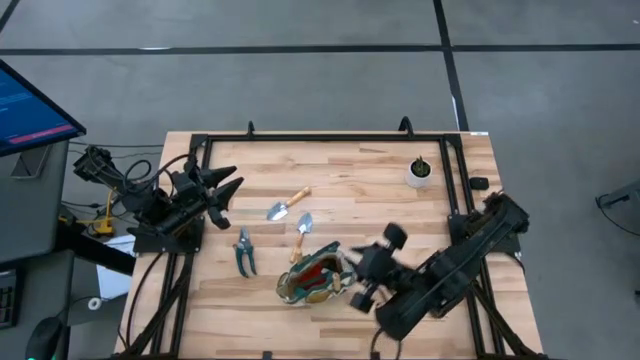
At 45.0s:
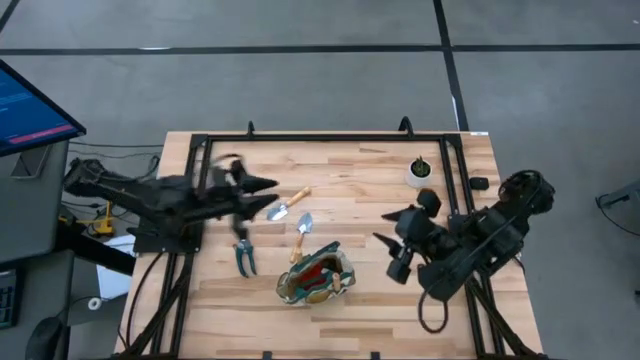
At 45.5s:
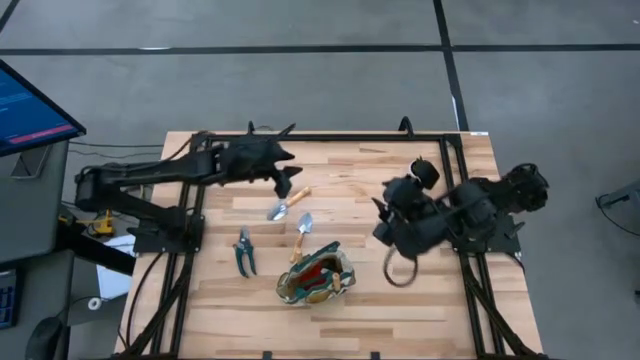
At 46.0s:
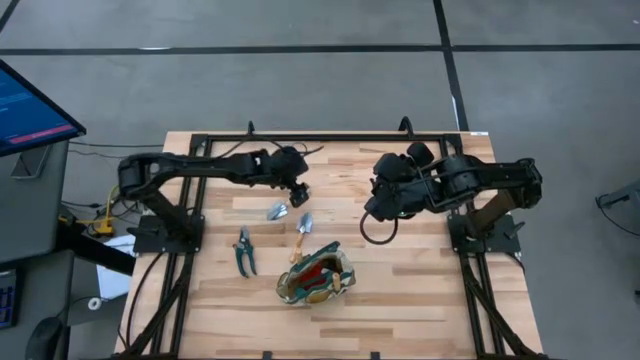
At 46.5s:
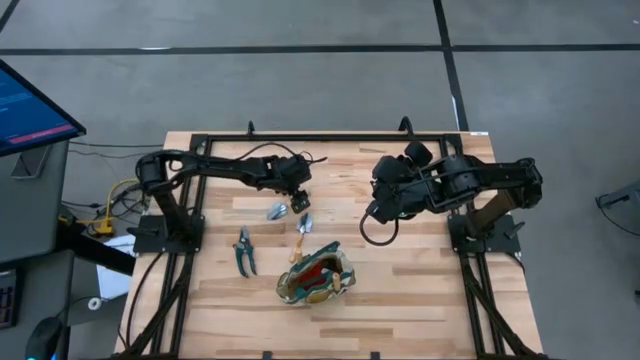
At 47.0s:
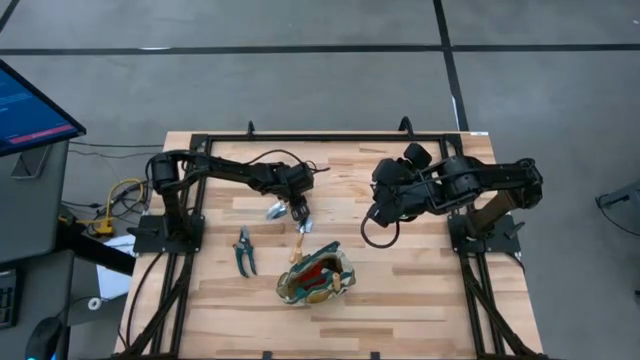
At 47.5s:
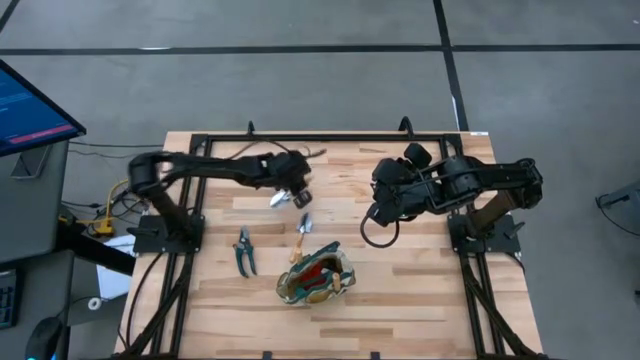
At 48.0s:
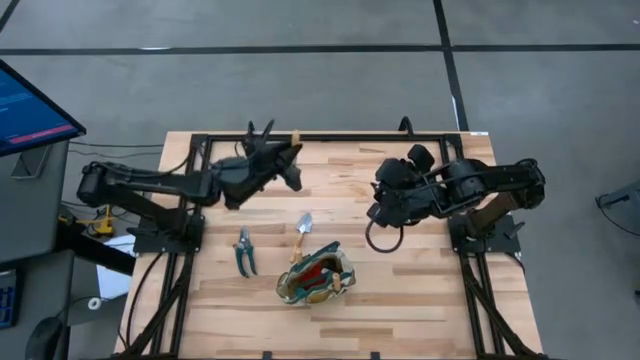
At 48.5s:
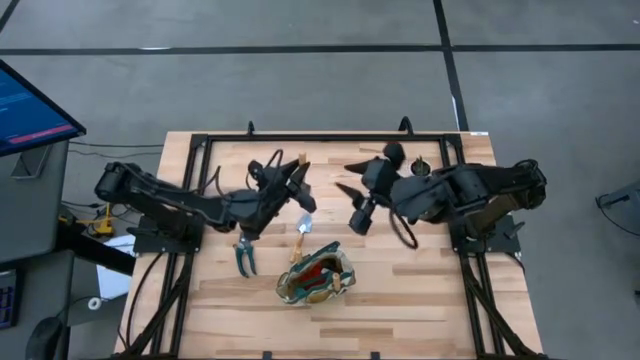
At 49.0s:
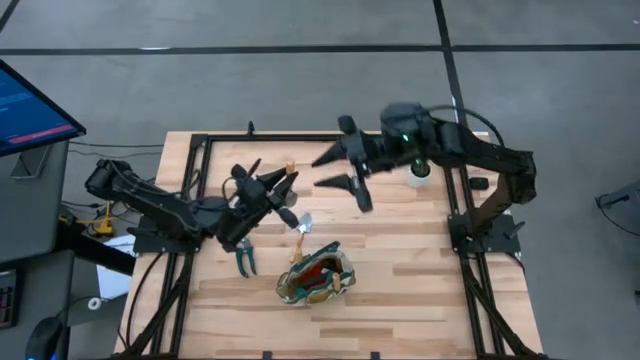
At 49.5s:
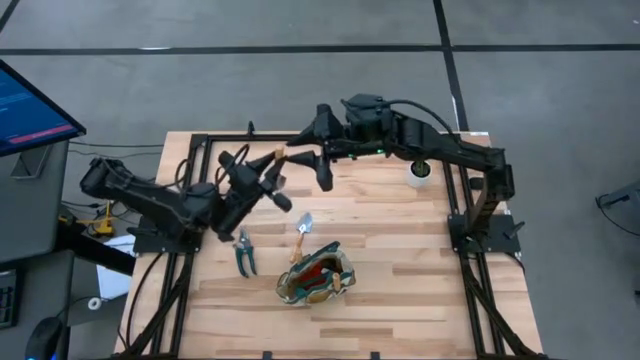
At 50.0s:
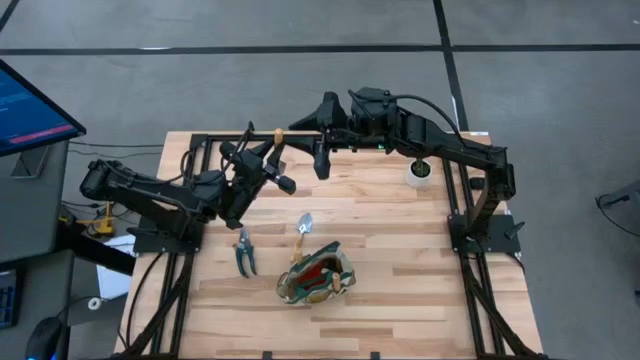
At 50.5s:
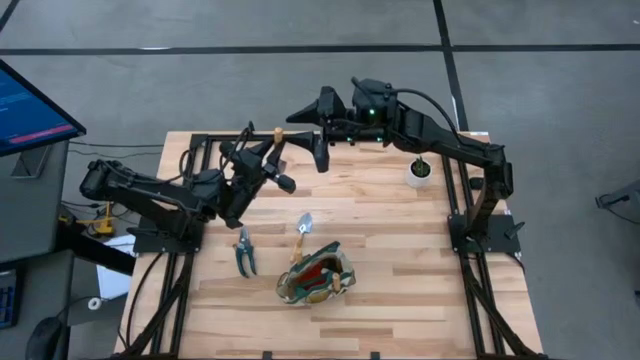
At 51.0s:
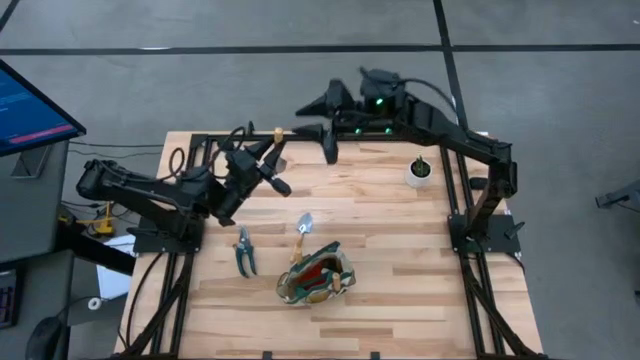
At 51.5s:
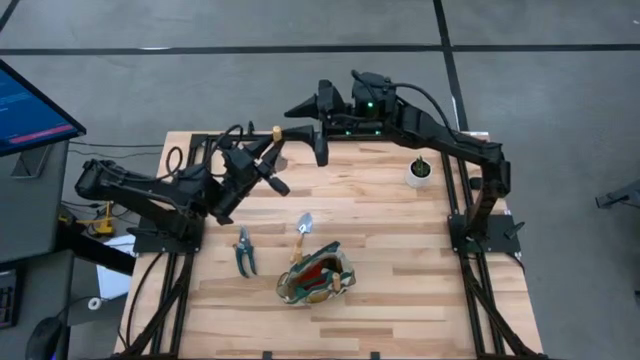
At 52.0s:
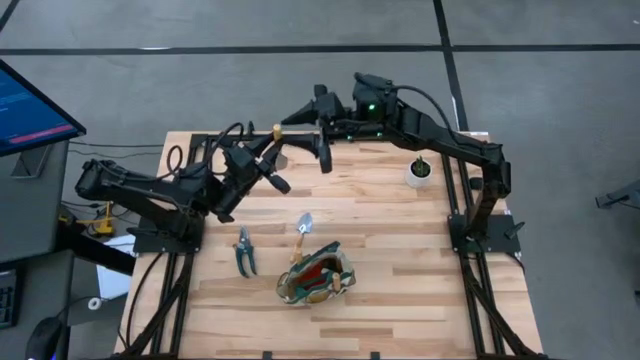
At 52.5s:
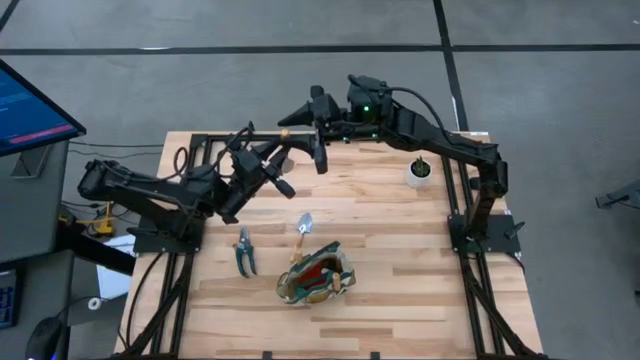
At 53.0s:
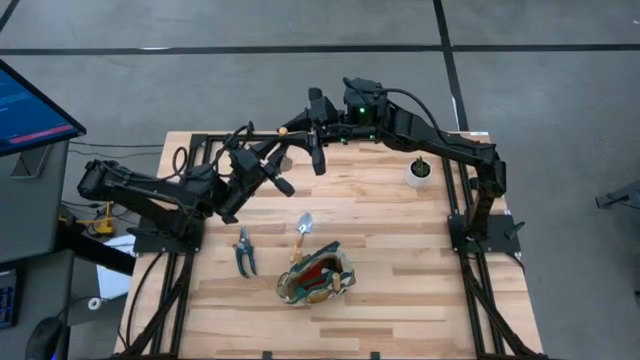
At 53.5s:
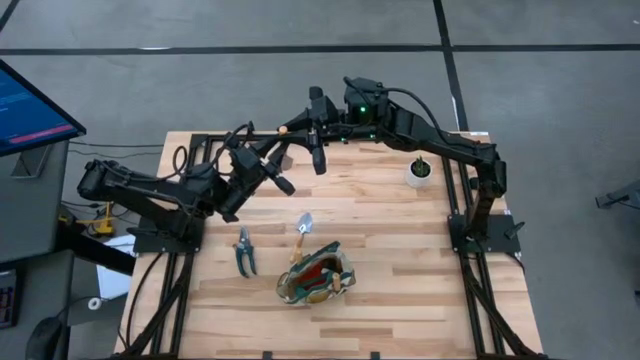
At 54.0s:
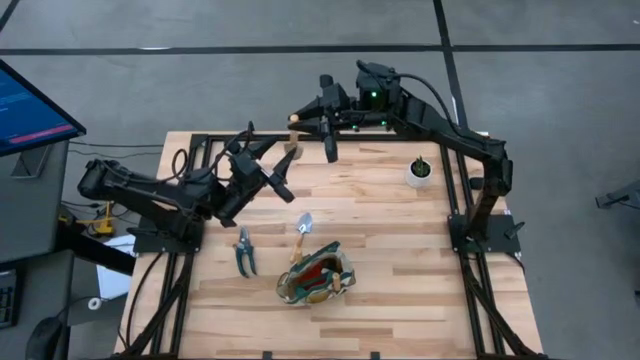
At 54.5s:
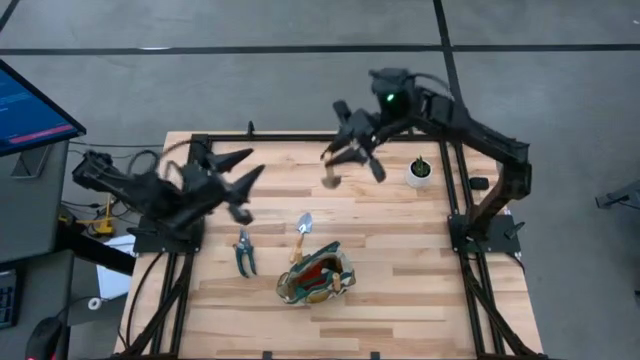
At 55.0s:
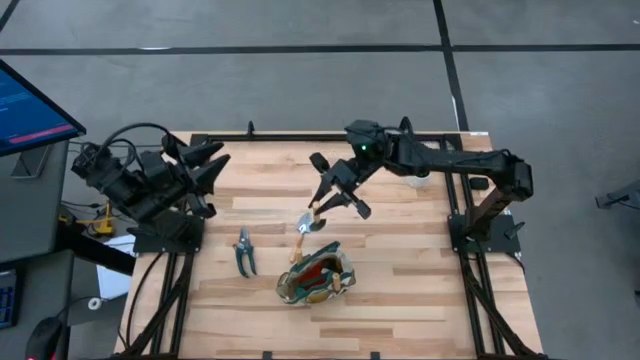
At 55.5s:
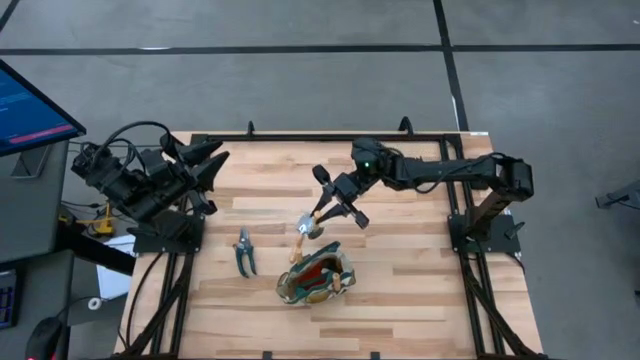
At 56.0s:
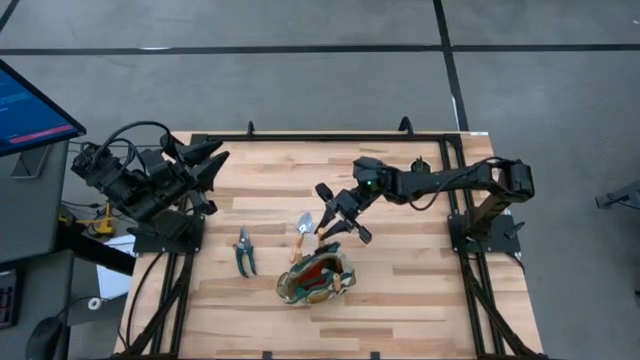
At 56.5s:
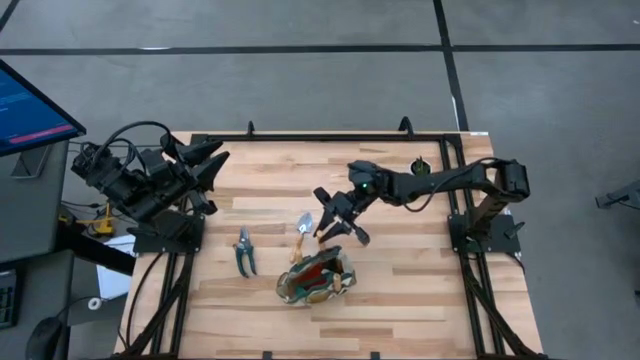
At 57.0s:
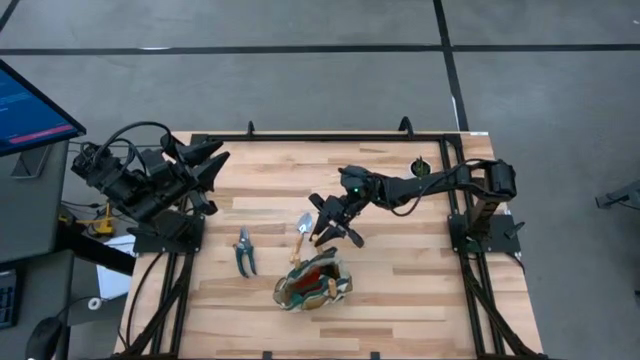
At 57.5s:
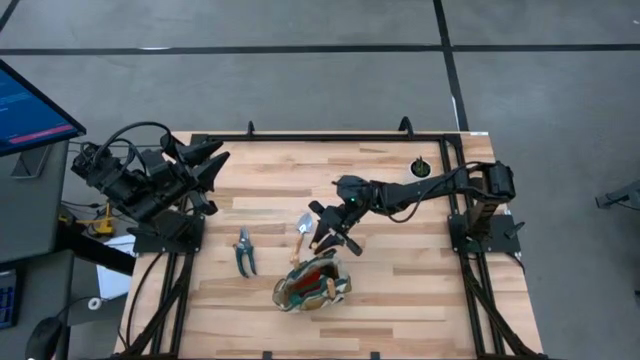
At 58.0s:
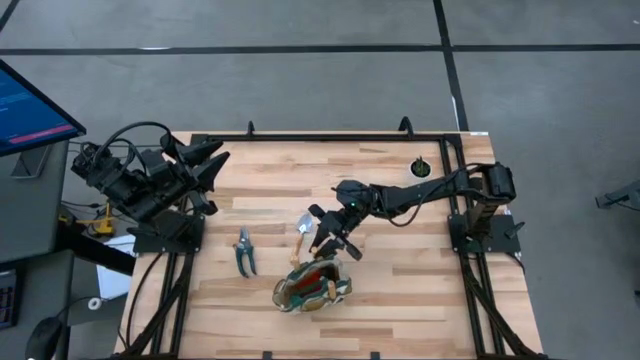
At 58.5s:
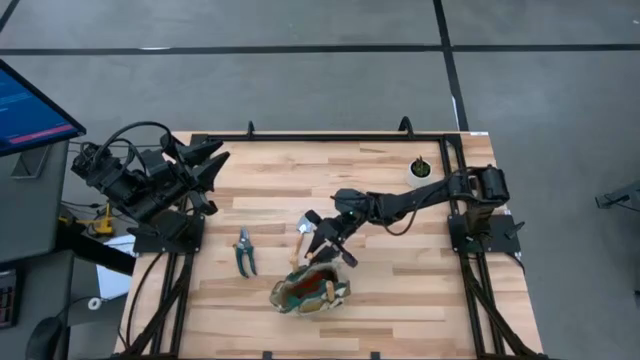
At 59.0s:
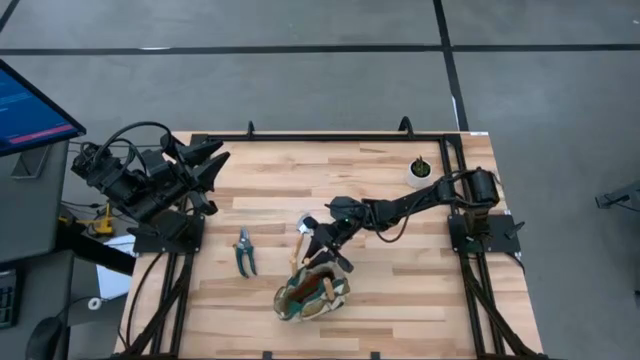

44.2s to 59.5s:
Task: Pick & Place Garden tools in Gardening bag
Put the brown trowel into the gardening bag pocket

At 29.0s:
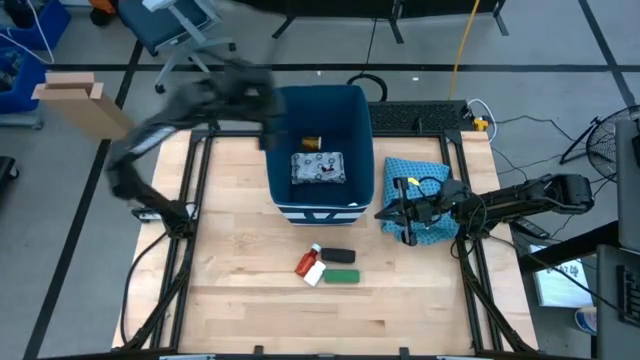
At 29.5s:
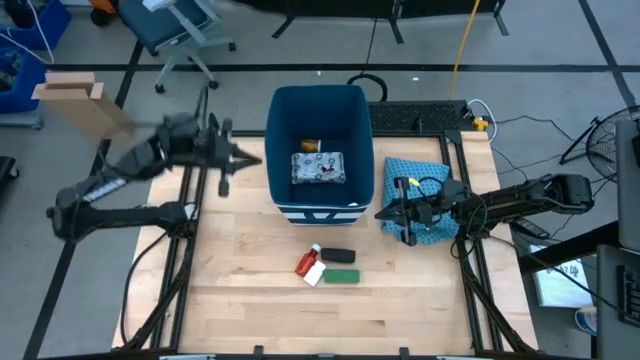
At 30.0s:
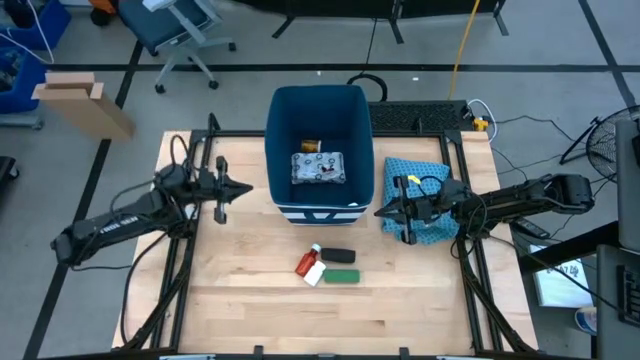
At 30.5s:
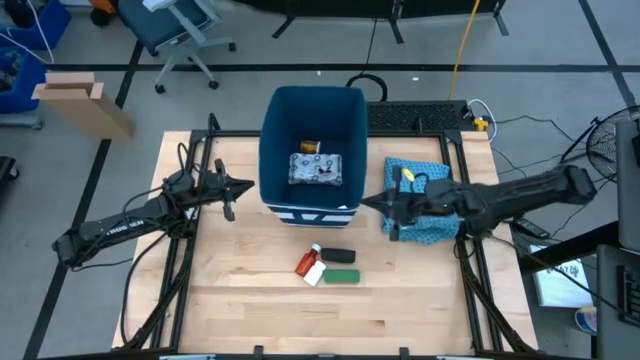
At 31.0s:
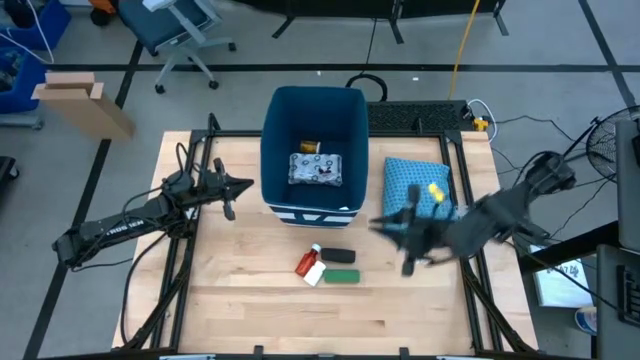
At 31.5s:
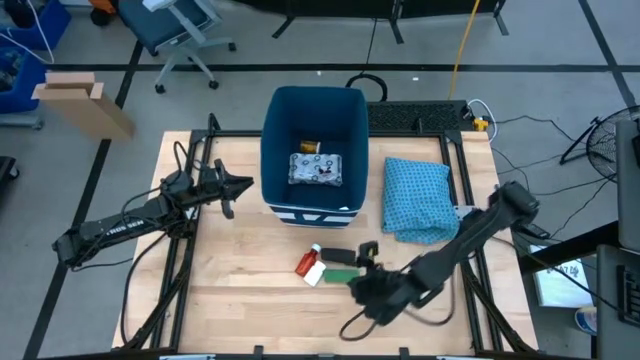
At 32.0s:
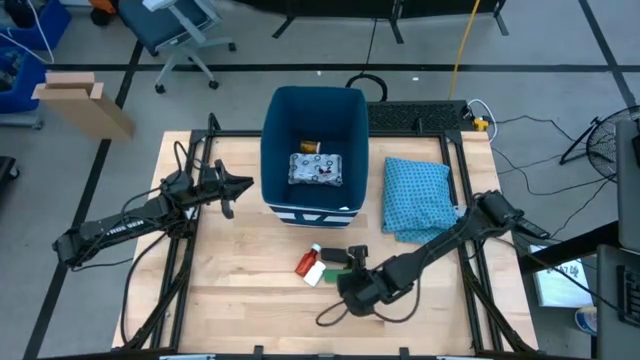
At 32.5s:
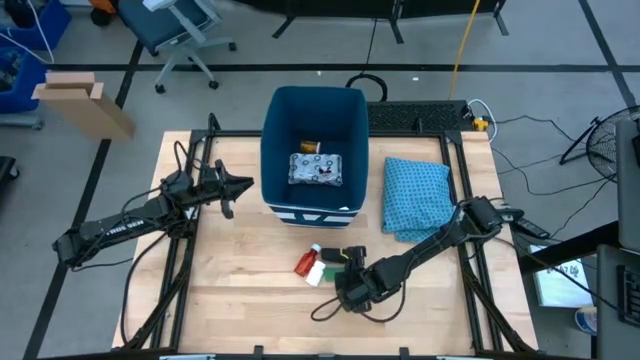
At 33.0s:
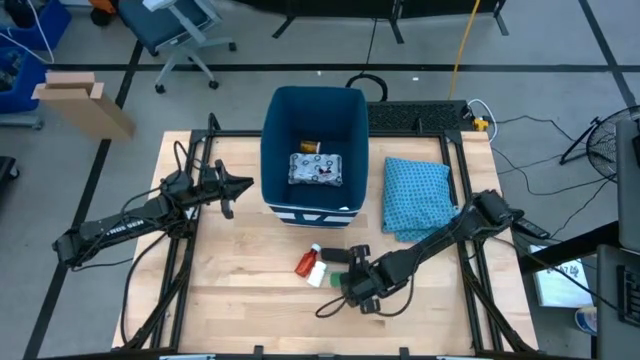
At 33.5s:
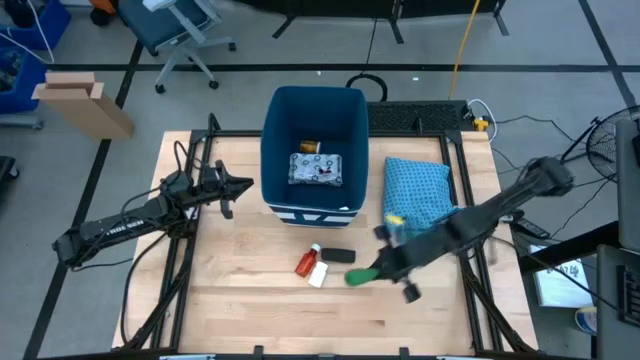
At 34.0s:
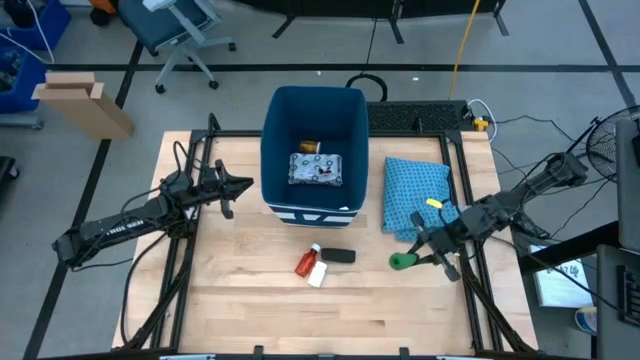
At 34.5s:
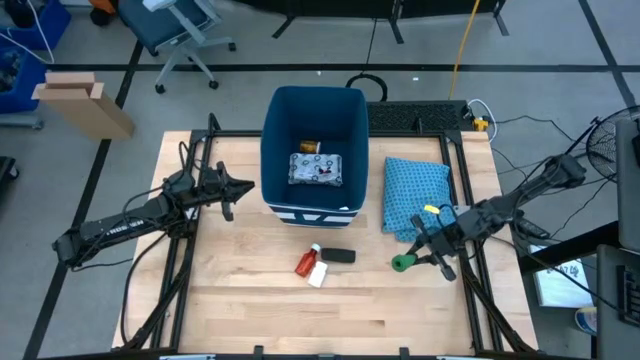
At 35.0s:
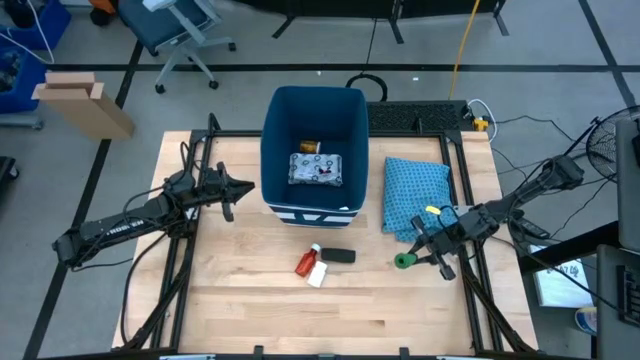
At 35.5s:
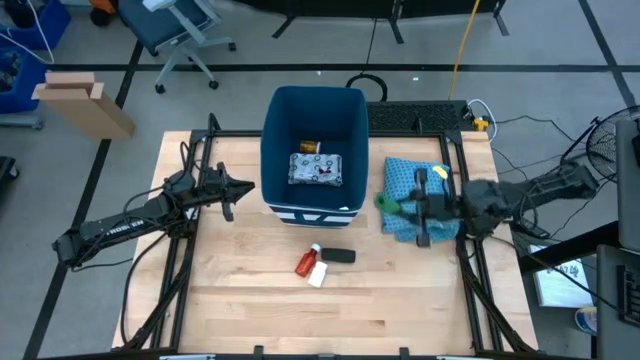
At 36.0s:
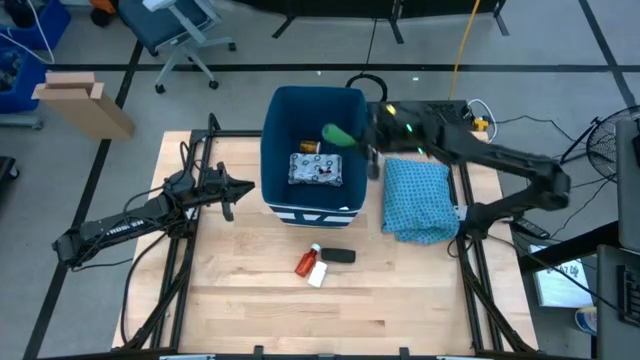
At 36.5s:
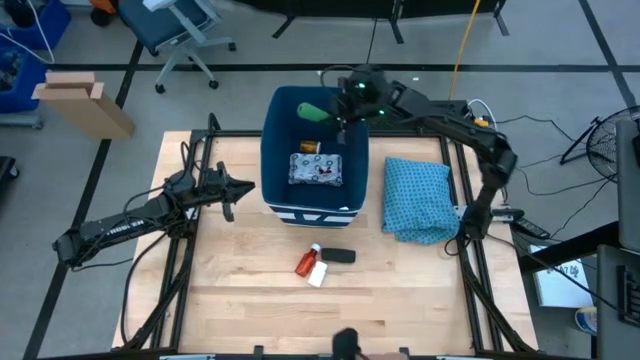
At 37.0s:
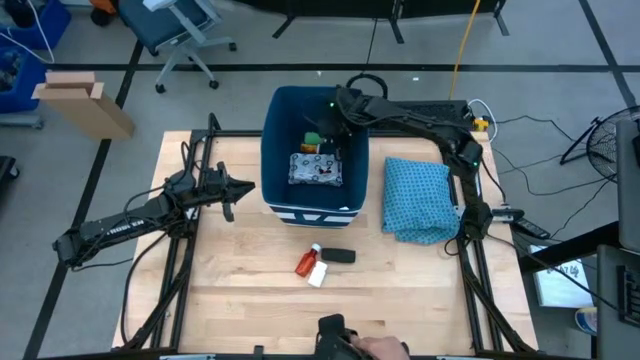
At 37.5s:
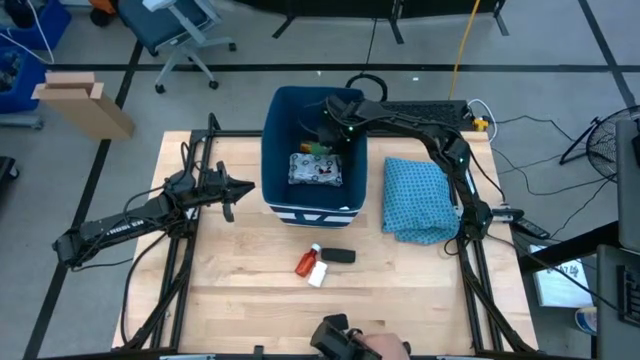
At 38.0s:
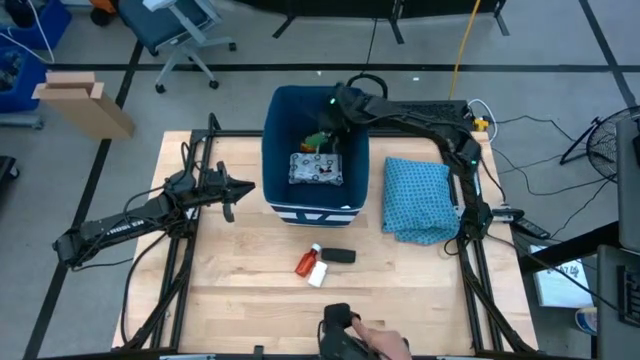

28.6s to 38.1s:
Task: Pick & place medical supplies in basket/bin
Put the green rolled bandage into the blue bin
